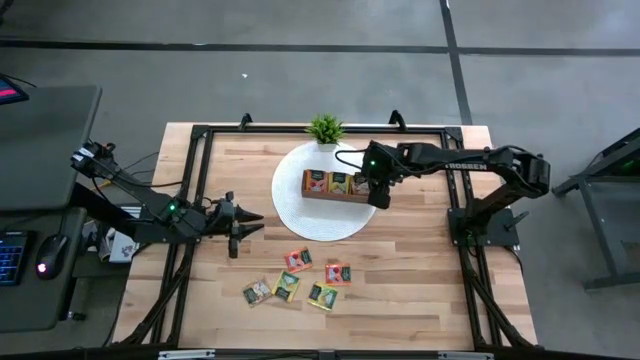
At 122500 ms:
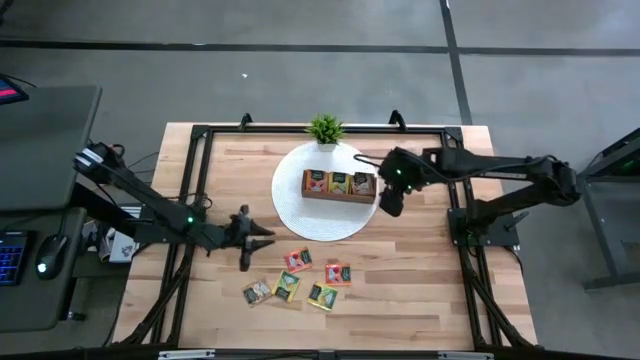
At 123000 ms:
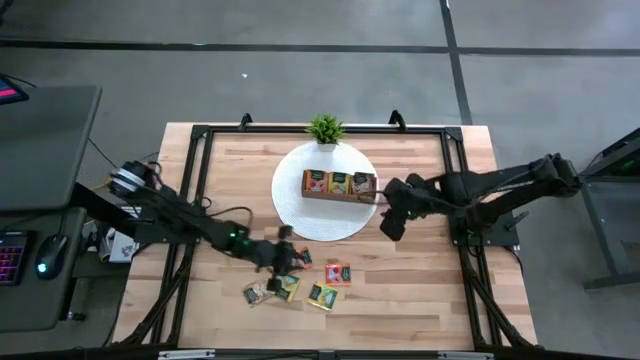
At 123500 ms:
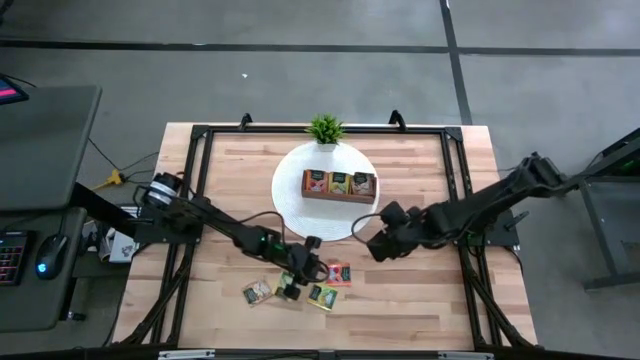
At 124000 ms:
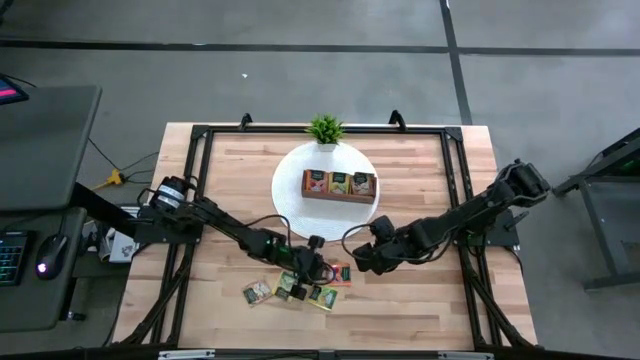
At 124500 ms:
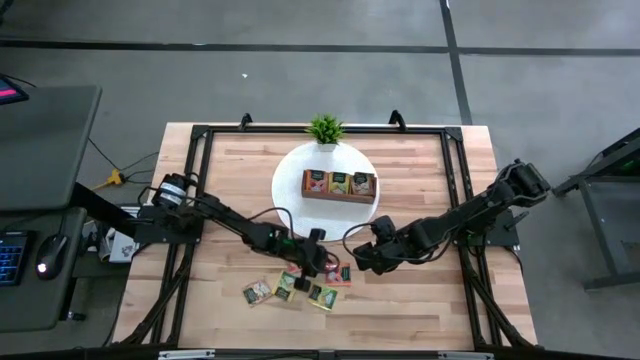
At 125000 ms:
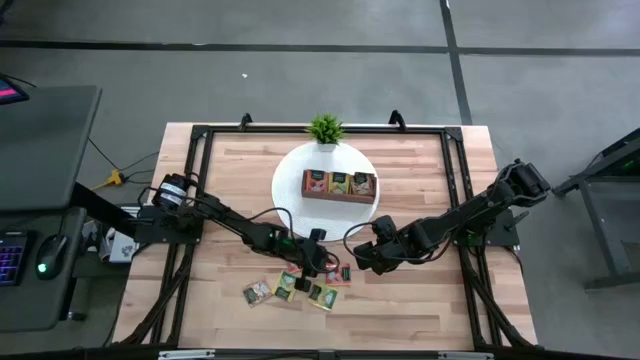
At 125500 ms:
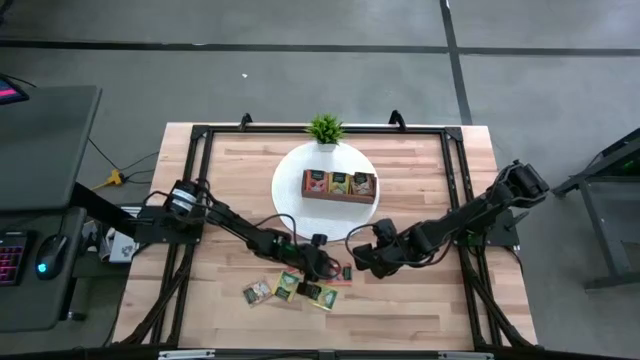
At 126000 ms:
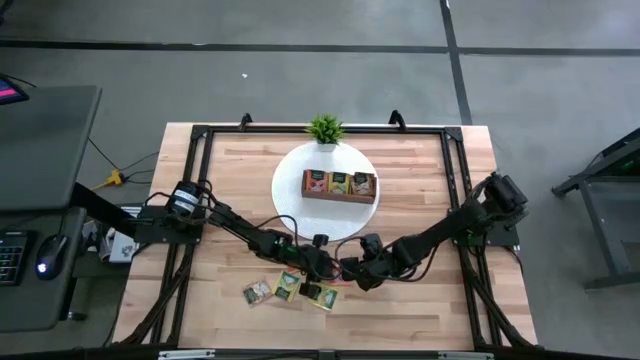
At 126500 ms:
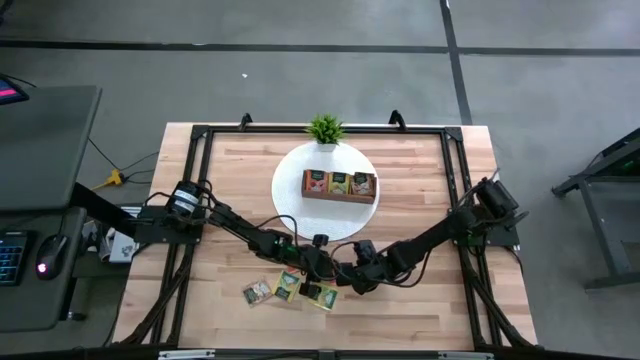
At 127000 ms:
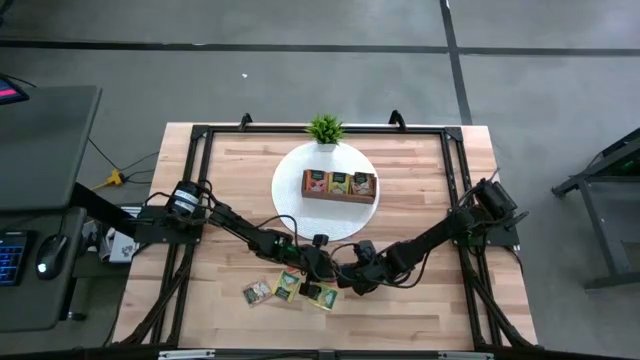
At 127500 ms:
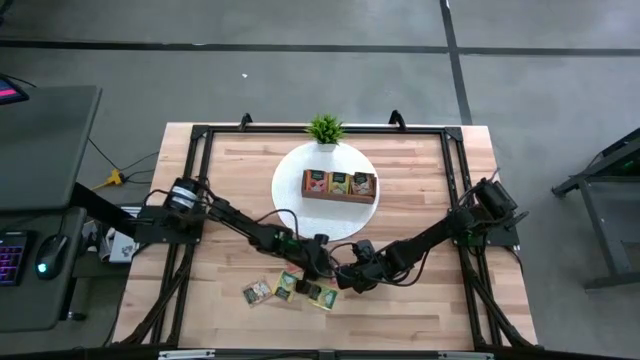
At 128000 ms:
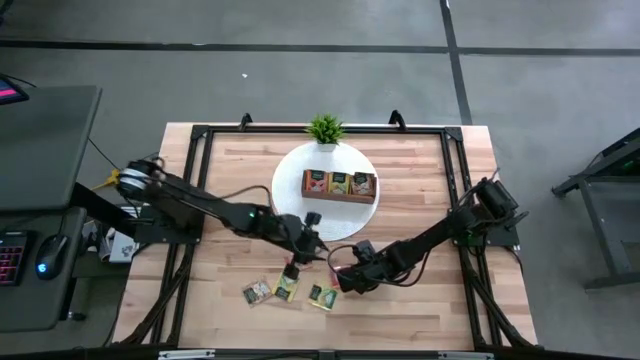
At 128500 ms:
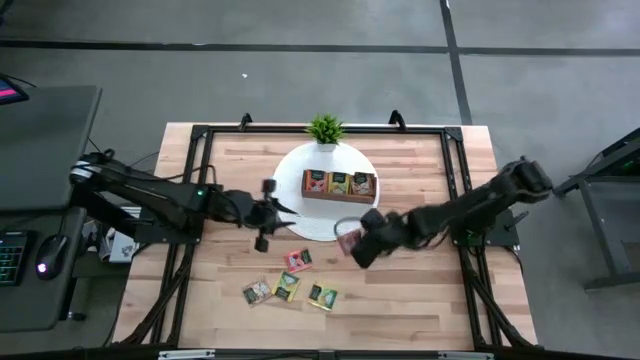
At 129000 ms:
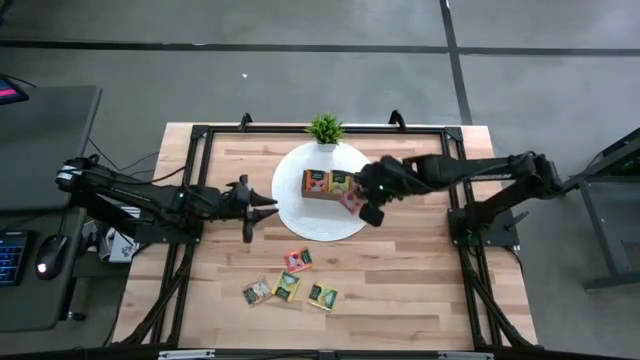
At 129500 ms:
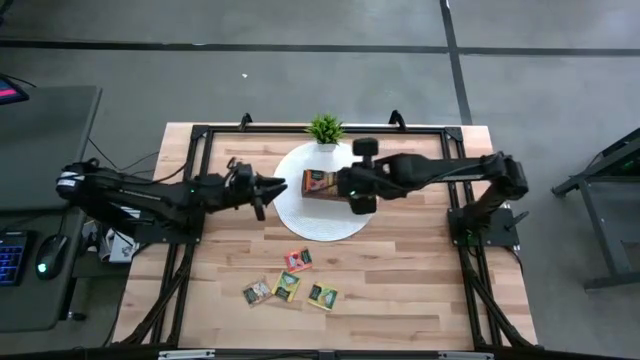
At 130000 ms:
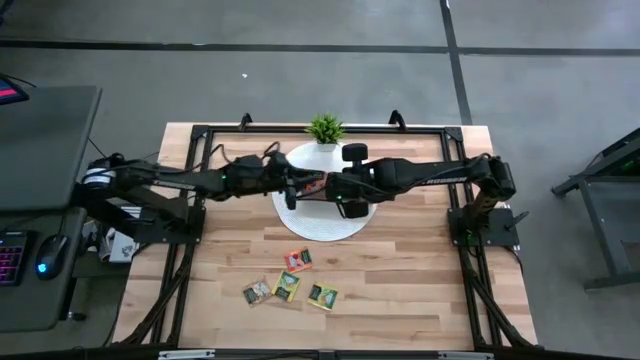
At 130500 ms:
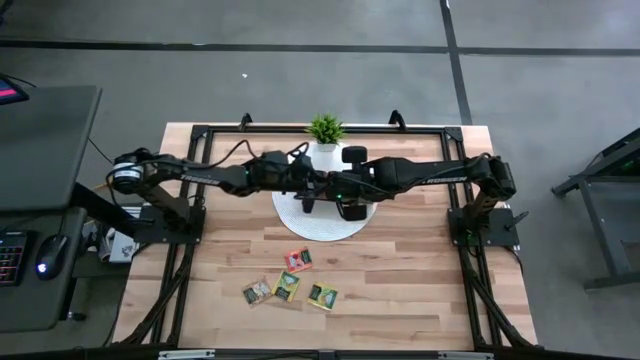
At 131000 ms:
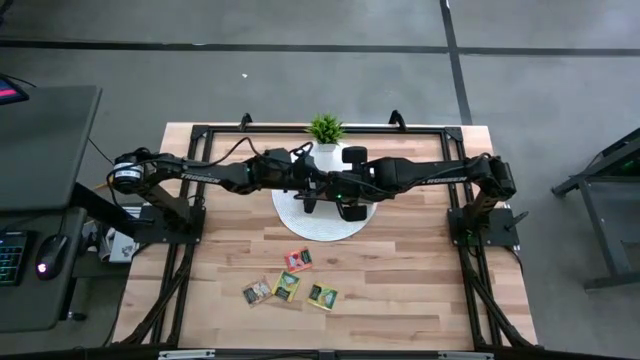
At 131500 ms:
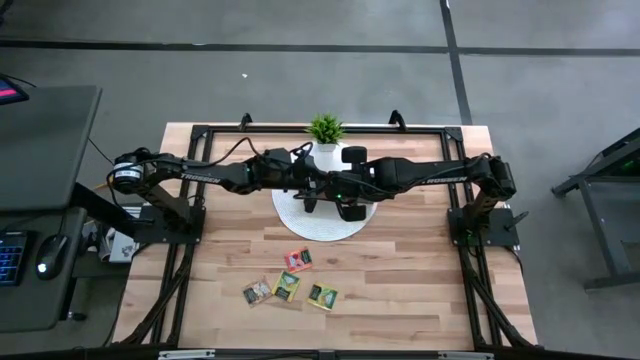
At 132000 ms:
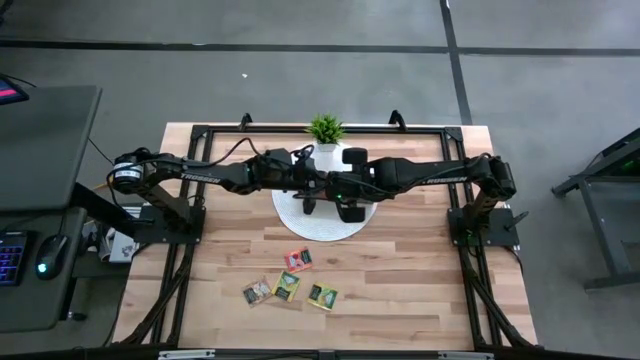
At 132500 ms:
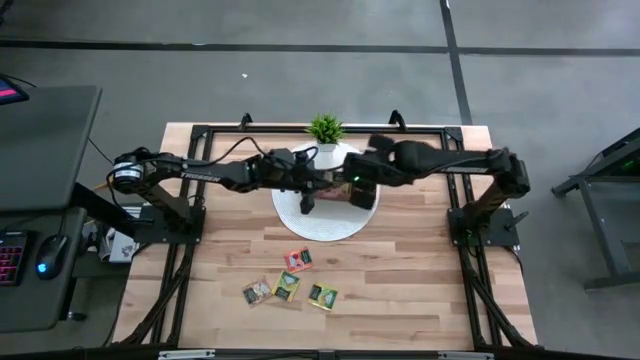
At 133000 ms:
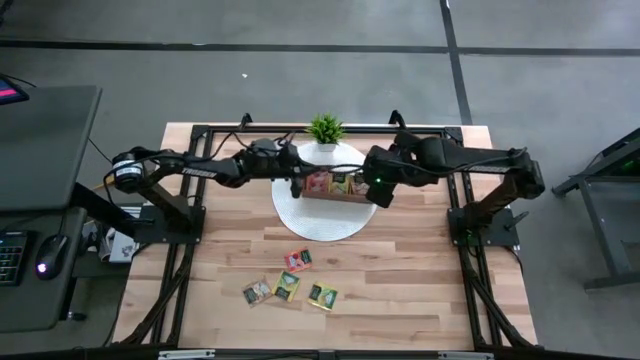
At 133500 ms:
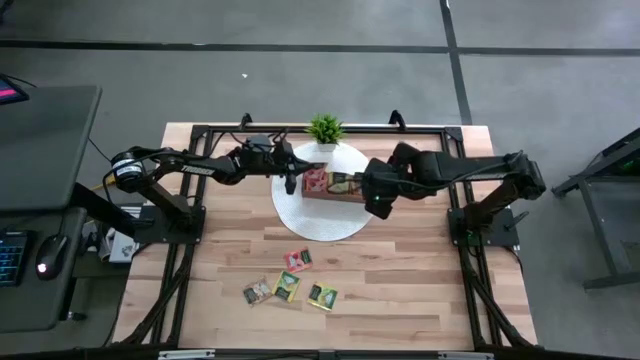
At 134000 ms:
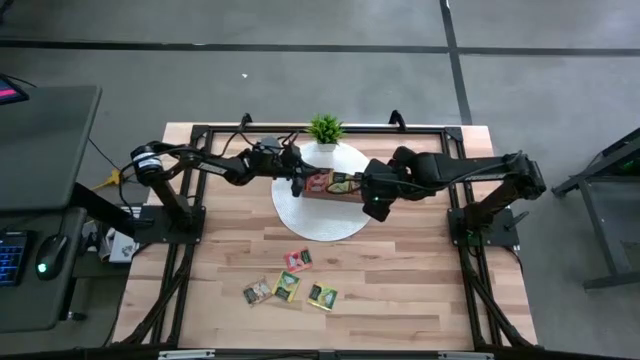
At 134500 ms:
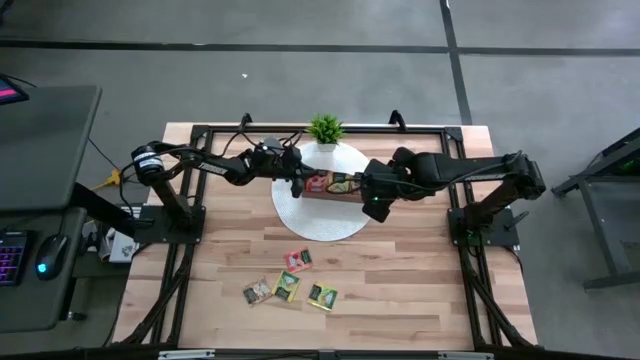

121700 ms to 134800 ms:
Task: Pick & Place Tea
Put the orange tea bag into the left section of the wooden organizer

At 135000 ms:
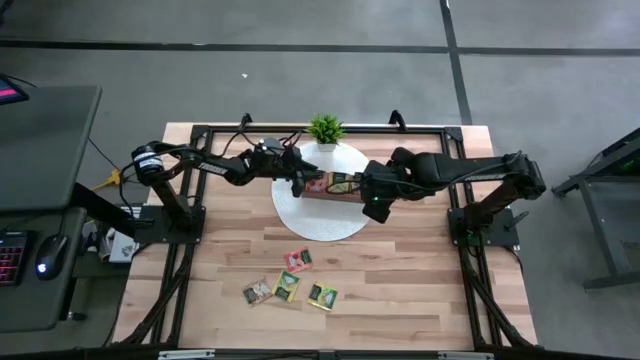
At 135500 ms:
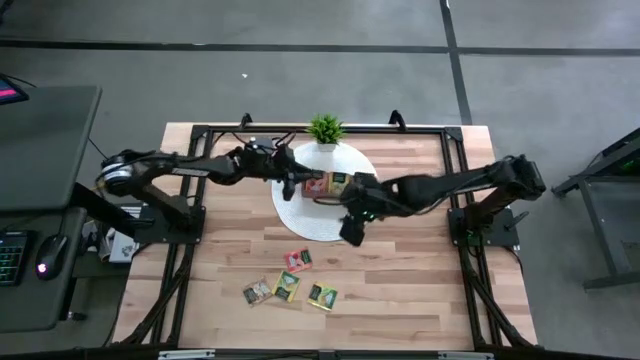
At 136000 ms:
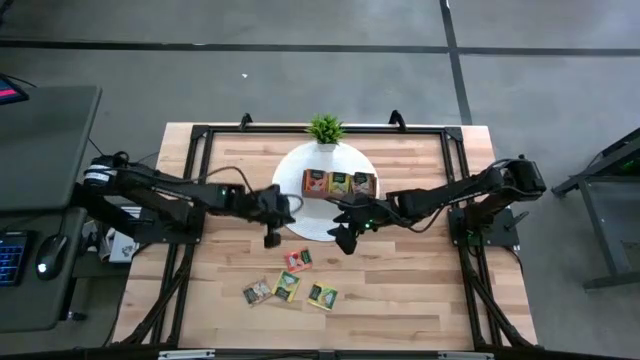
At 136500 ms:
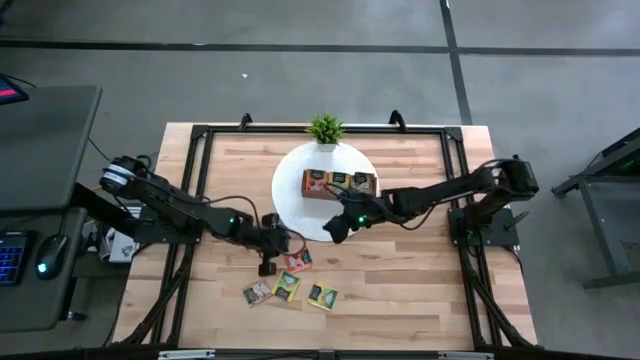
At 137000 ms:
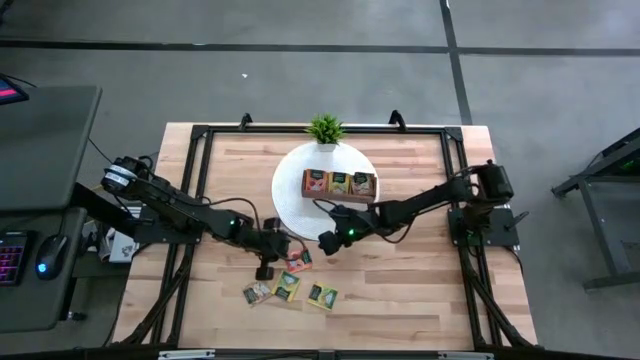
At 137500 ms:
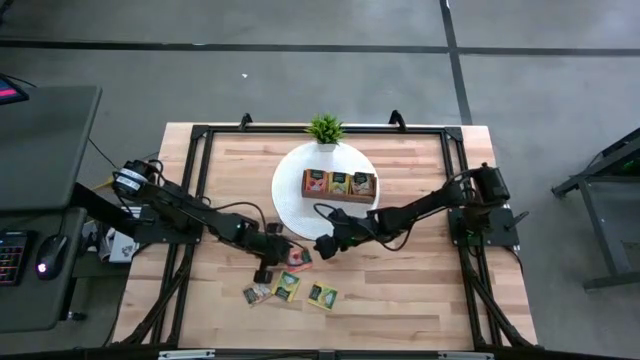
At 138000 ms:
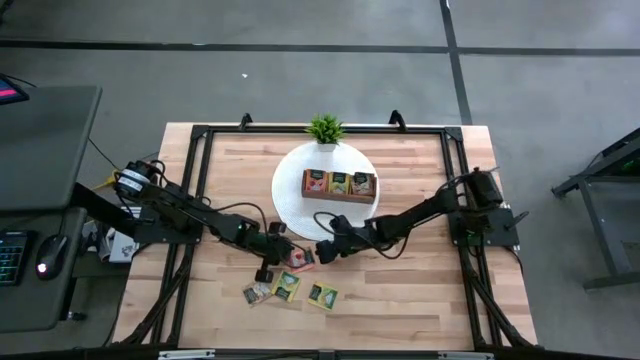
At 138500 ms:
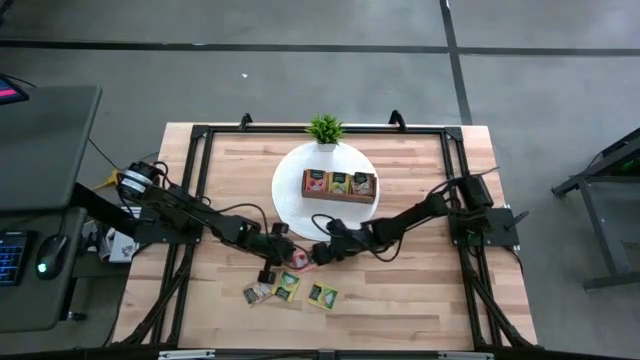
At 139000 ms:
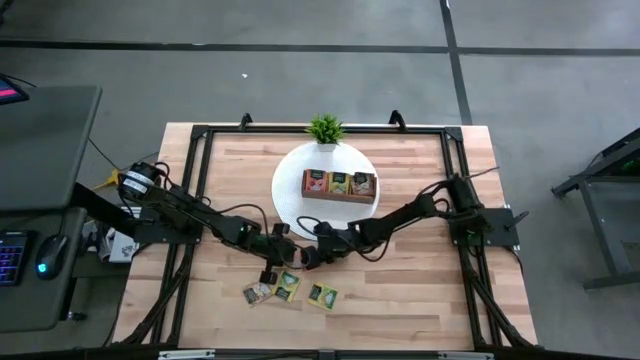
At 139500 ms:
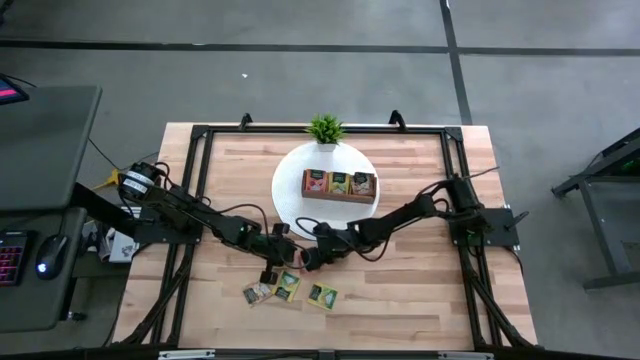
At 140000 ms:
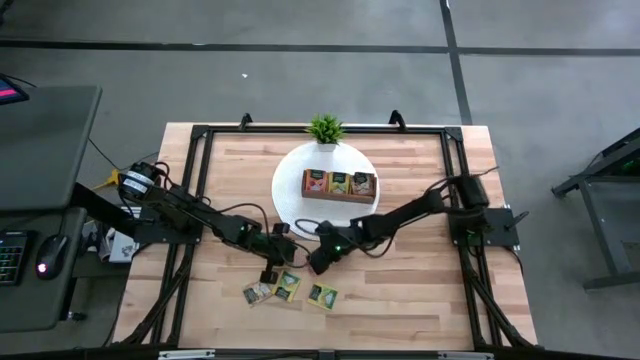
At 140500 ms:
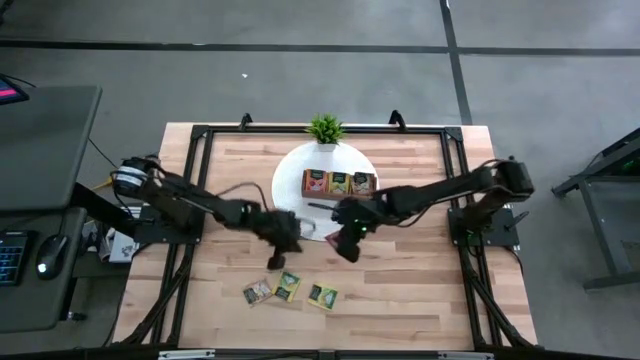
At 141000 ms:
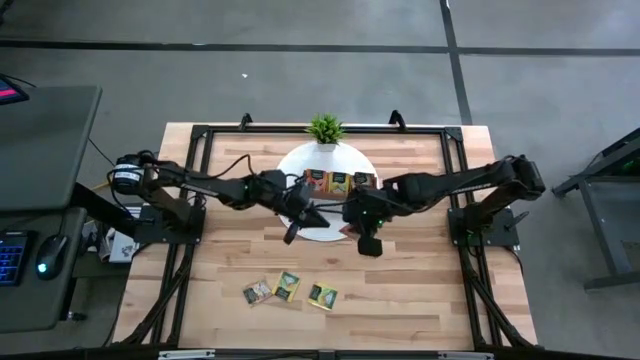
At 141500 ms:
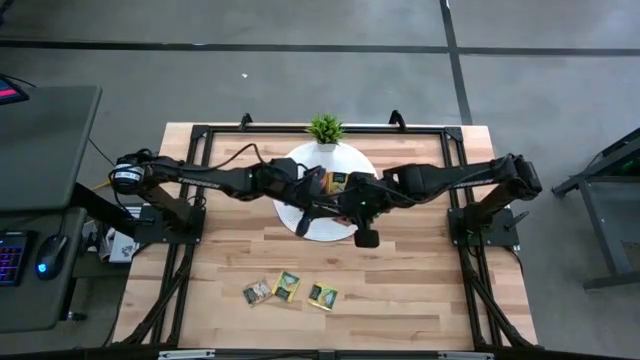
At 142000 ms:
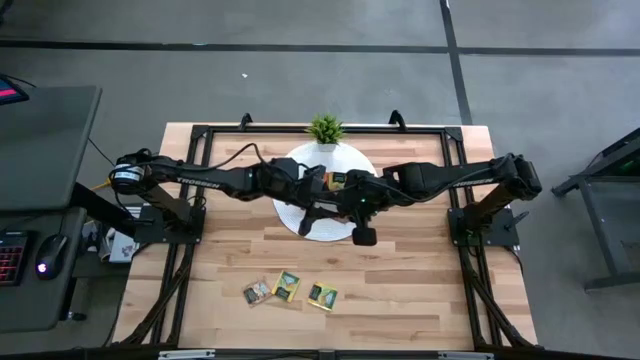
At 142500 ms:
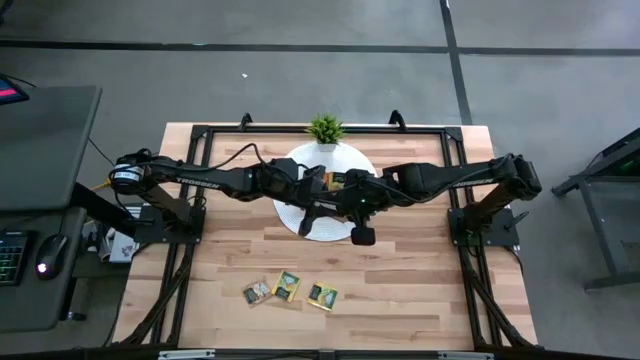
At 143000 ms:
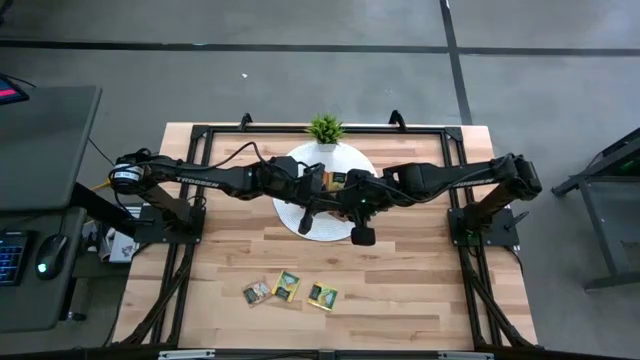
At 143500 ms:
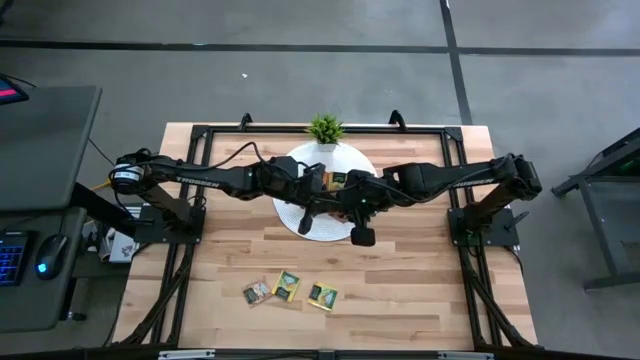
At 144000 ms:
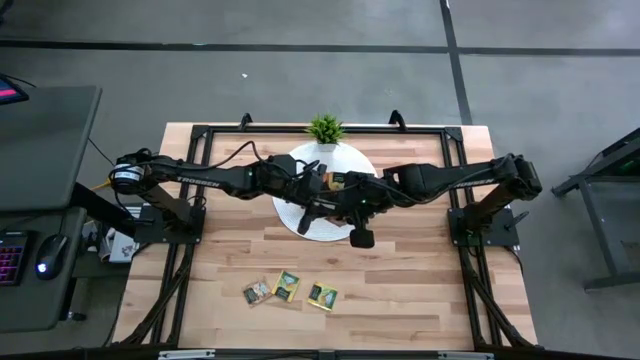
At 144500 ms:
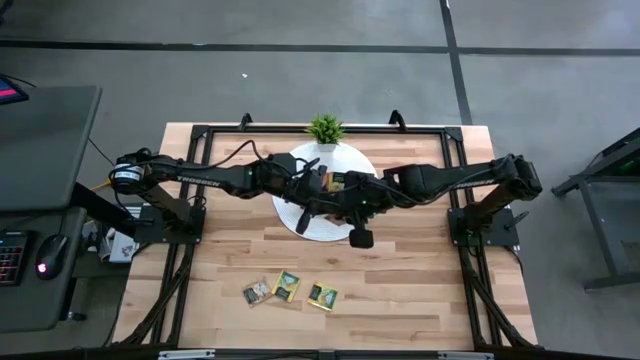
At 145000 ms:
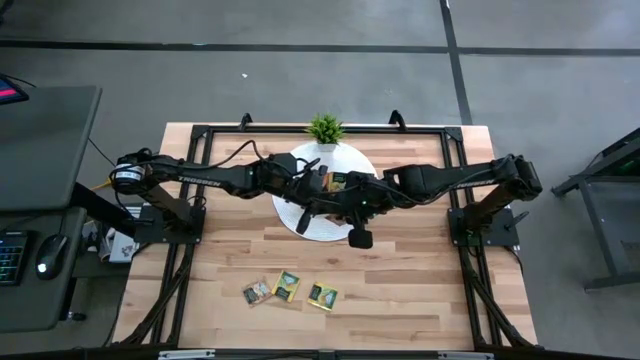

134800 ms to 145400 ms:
Put the orange tea bag into the left section of the wooden organizer
